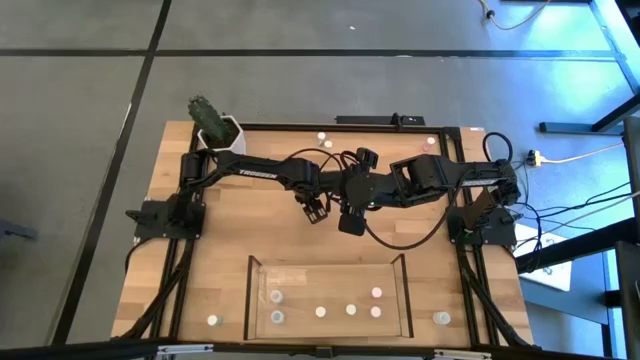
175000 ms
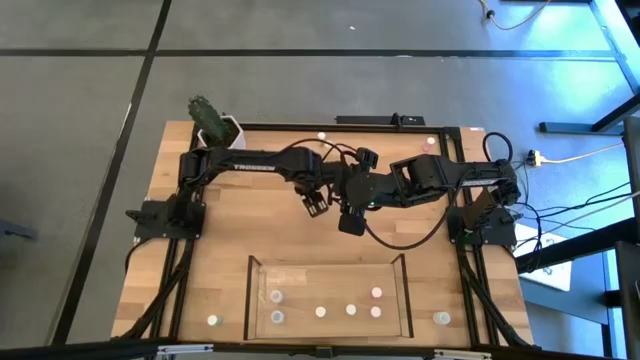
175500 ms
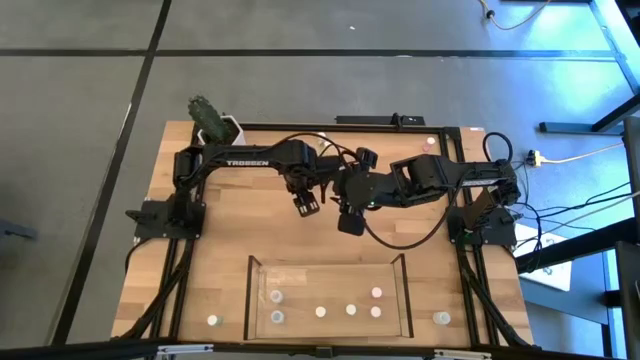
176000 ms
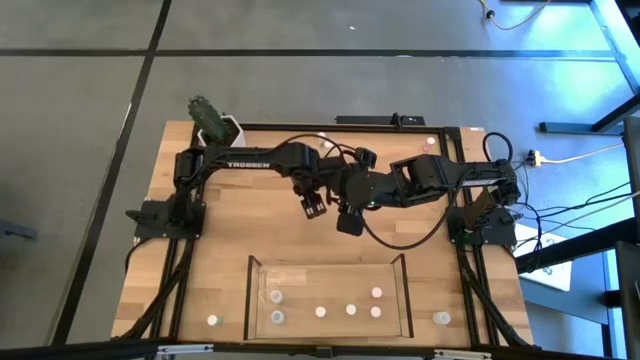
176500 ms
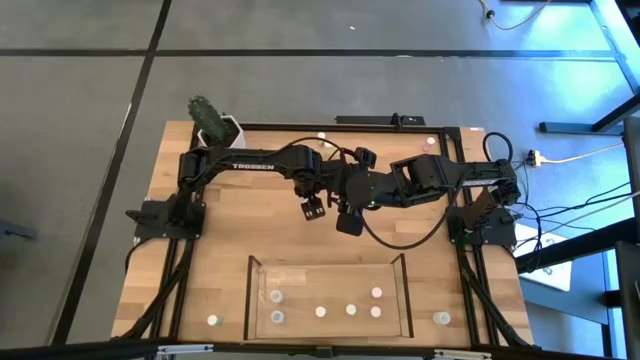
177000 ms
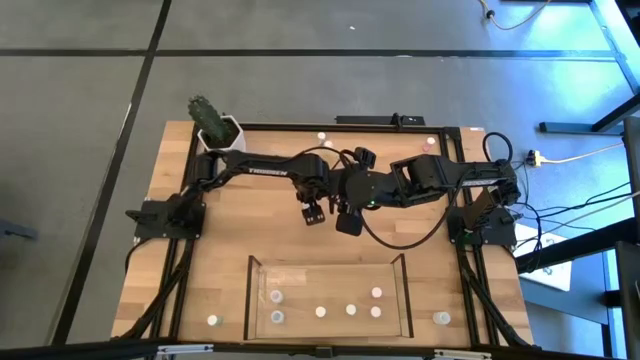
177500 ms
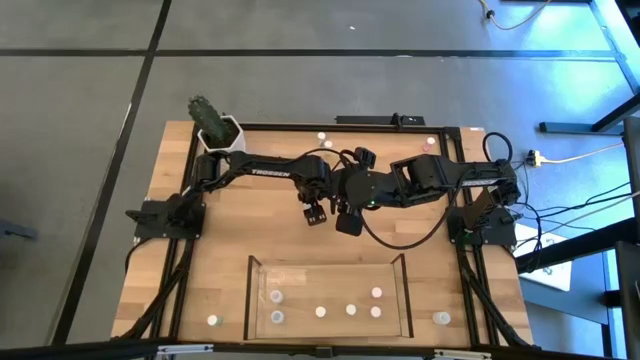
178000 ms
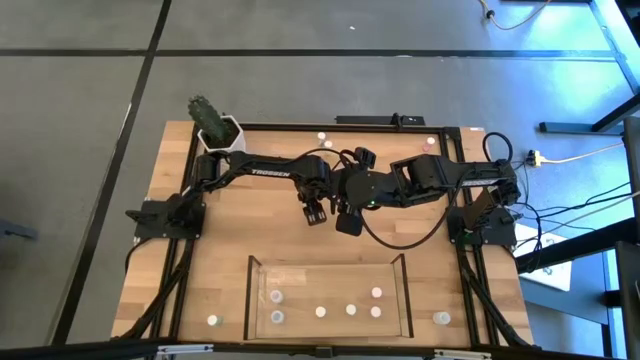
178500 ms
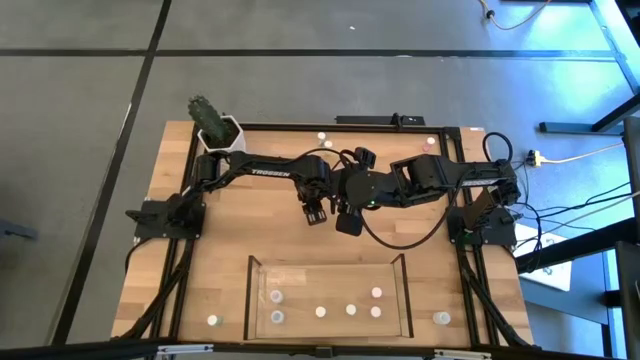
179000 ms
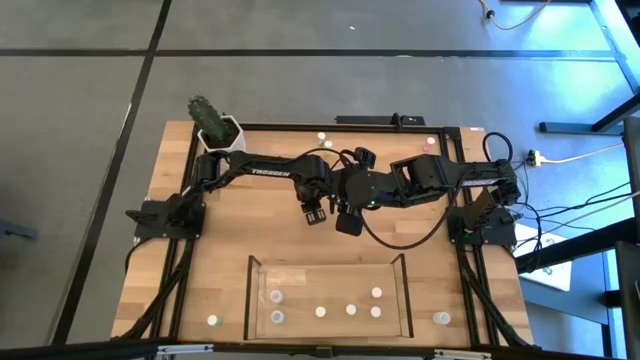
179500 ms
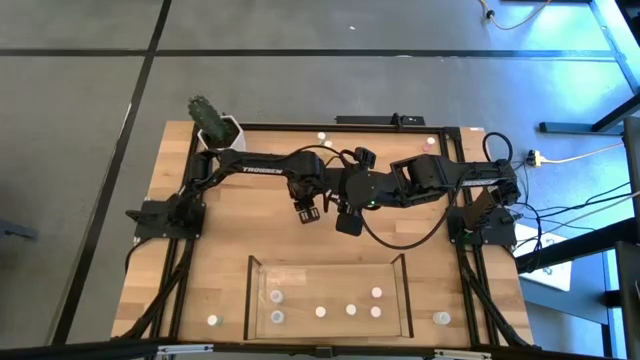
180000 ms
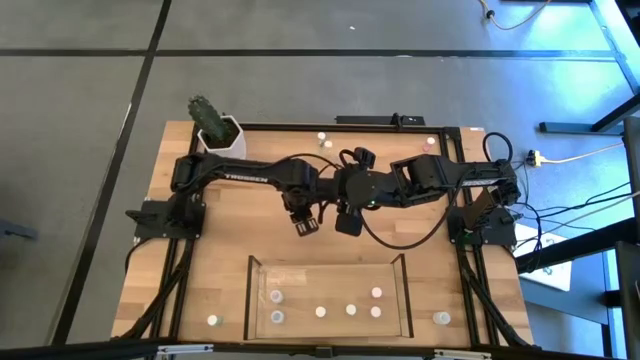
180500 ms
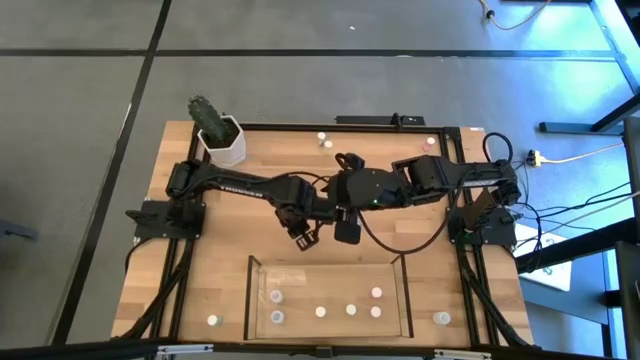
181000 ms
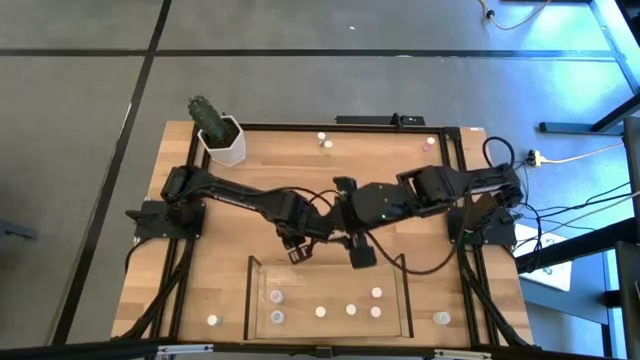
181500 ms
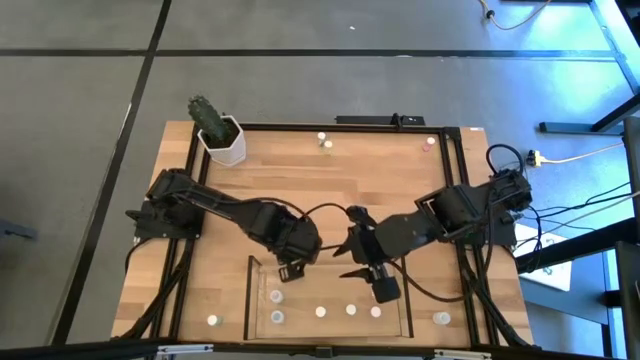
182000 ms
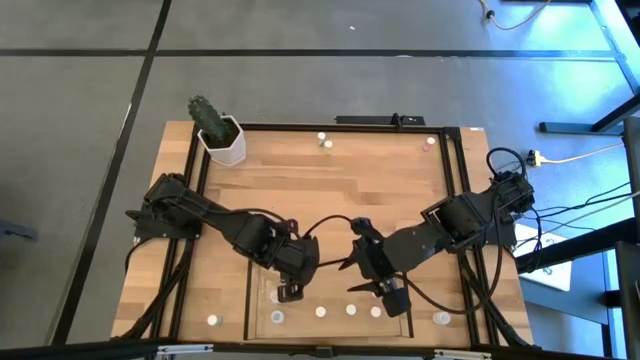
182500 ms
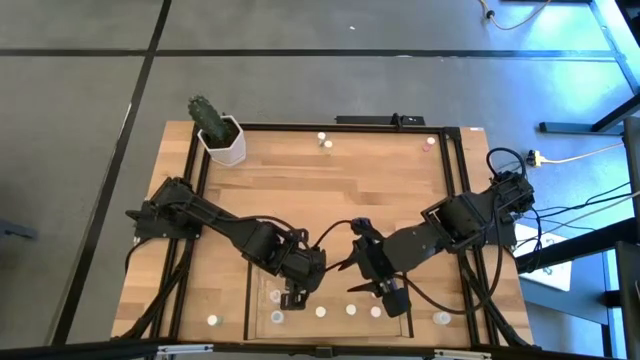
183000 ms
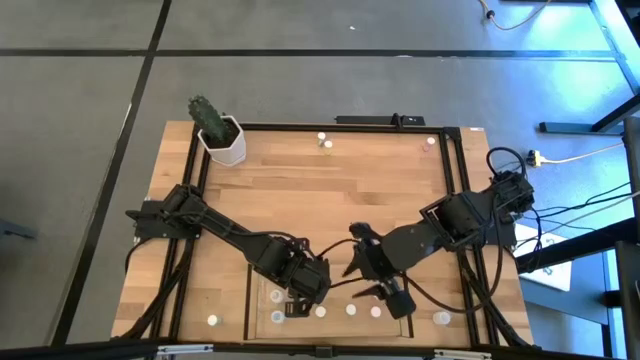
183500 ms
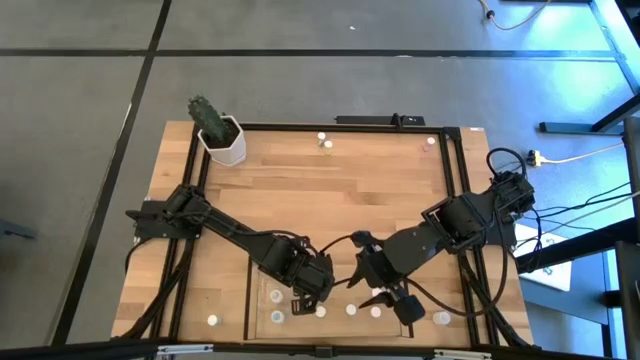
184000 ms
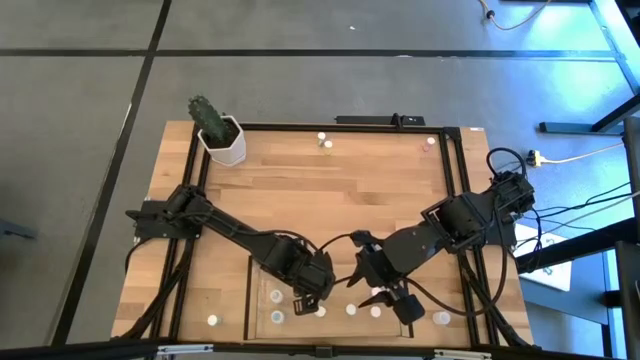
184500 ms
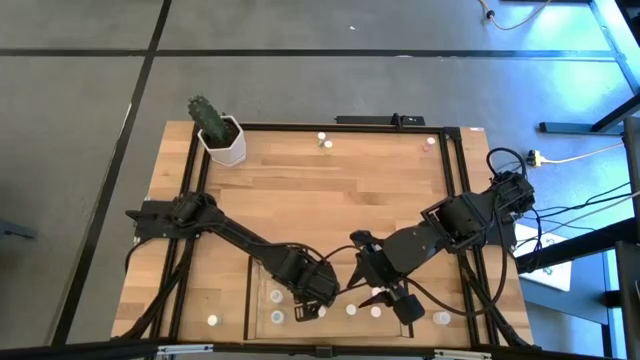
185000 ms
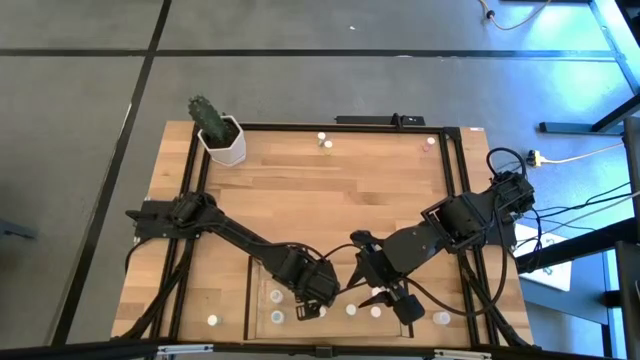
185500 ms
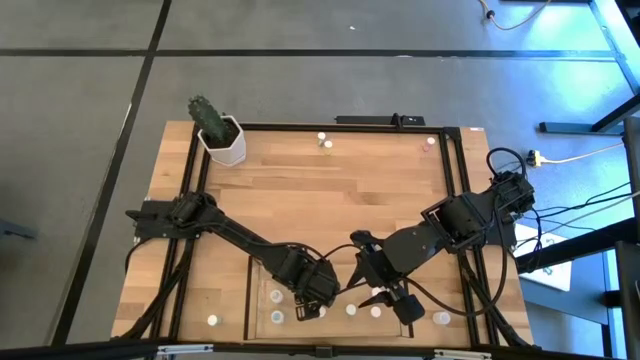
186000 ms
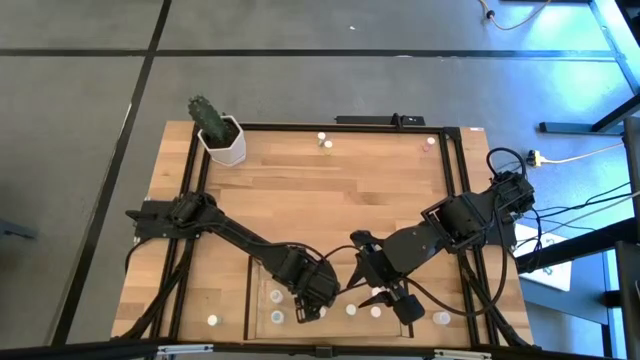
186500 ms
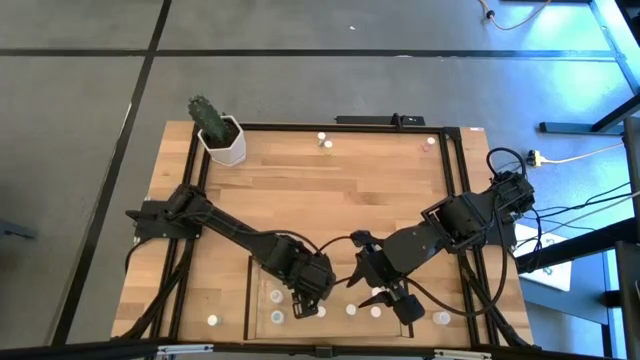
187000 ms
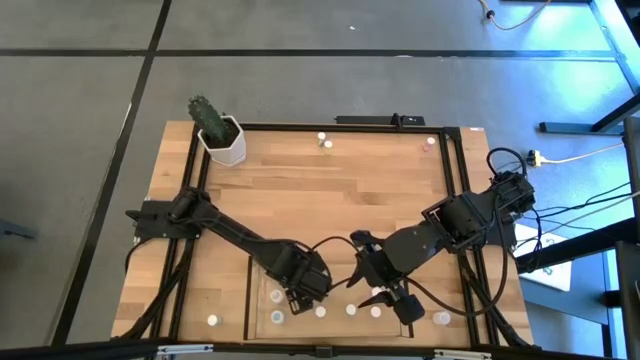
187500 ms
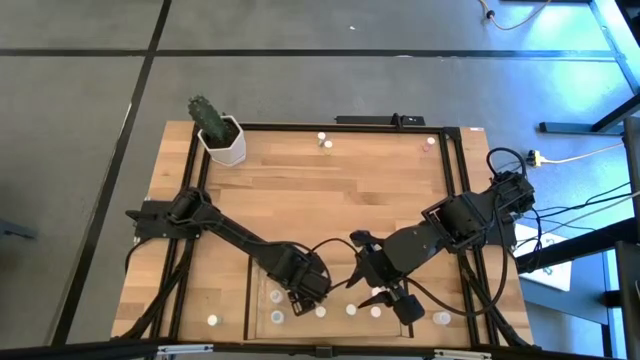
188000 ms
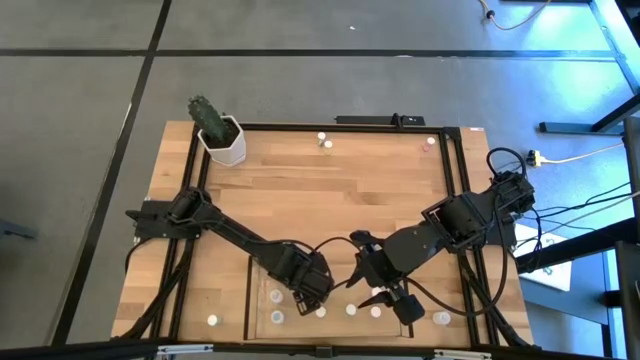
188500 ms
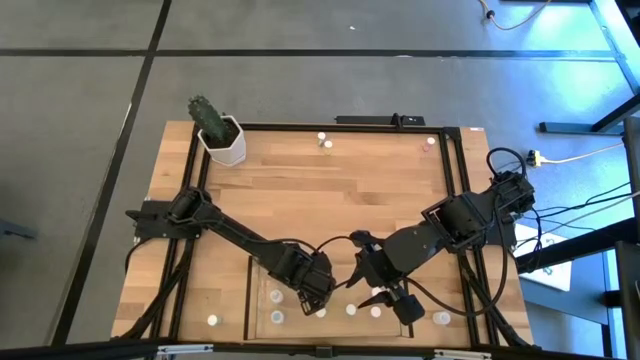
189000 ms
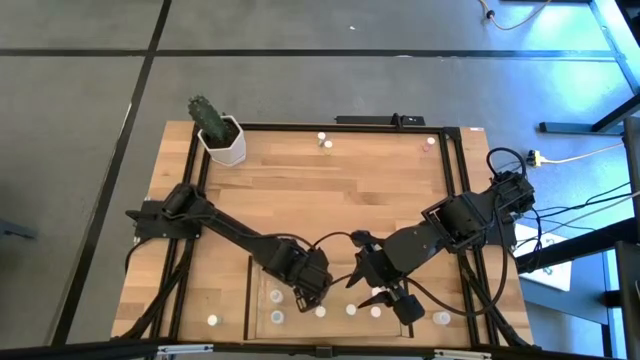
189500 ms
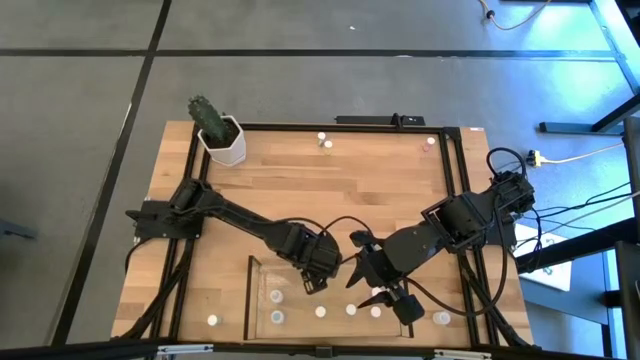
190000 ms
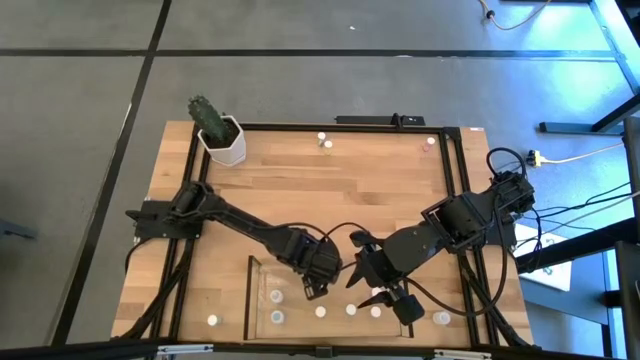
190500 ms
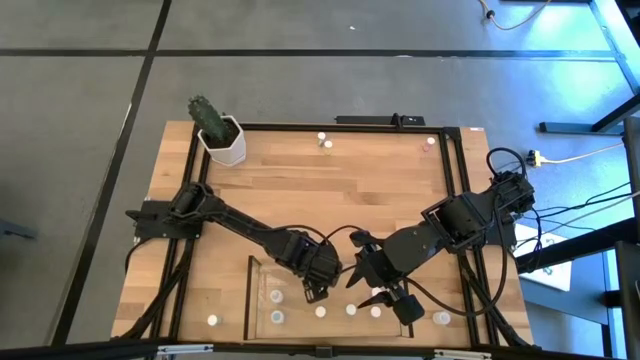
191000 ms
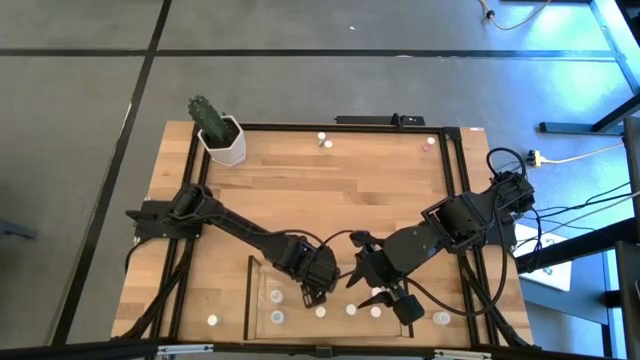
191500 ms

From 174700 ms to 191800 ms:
Task: Pick and place medicine bottles onto shelf by color
Put the bottom yellow pill bottle on the shelf aligned with the other yellow pill bottle

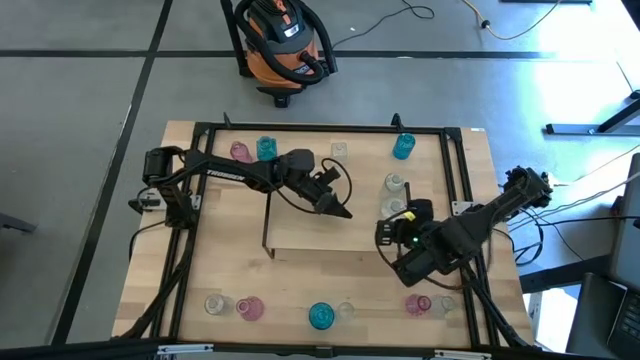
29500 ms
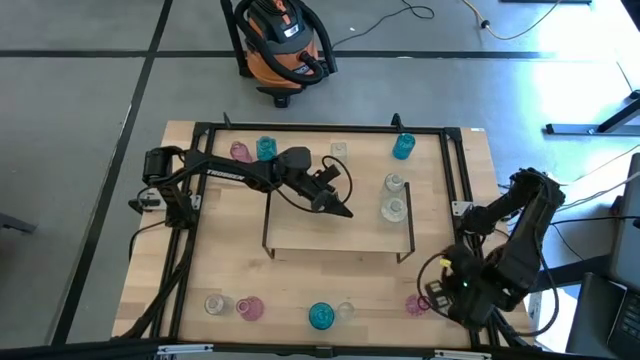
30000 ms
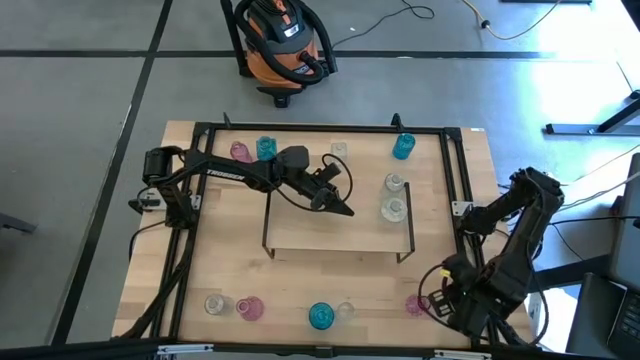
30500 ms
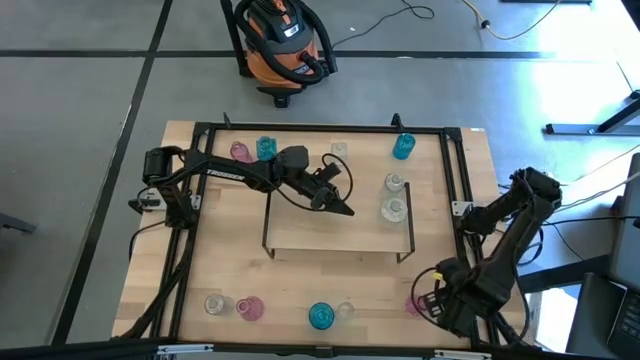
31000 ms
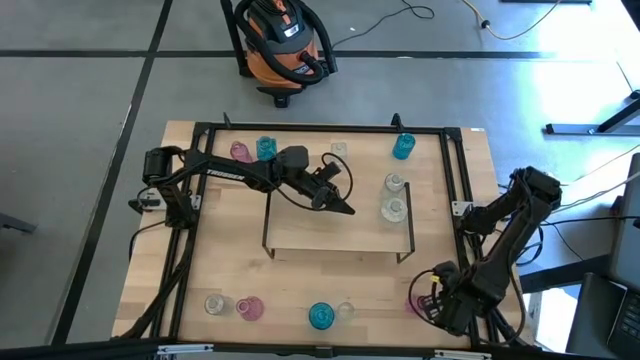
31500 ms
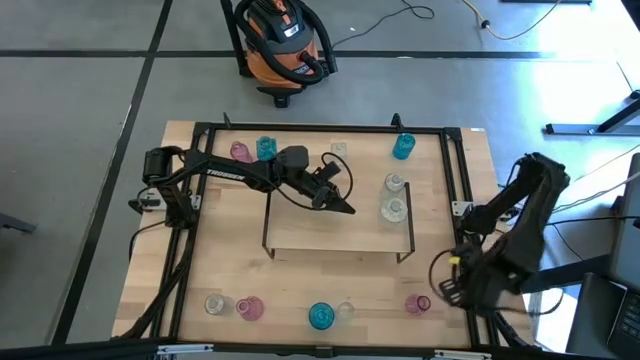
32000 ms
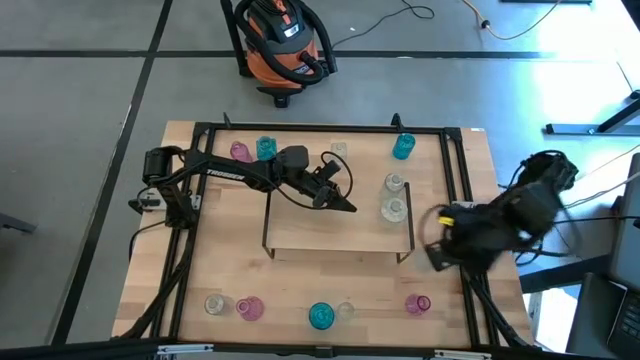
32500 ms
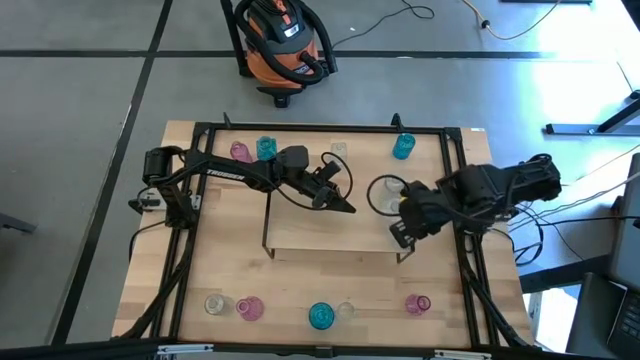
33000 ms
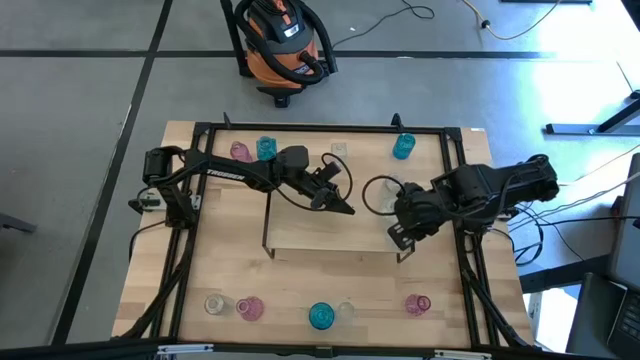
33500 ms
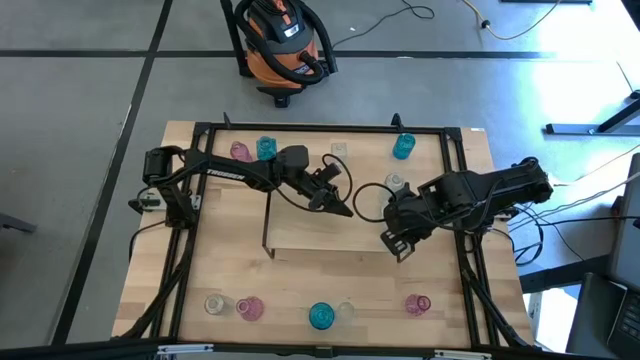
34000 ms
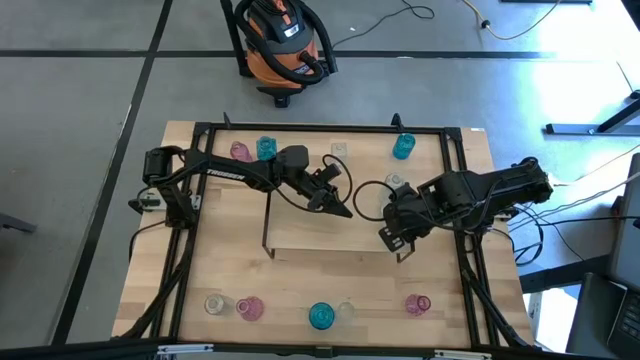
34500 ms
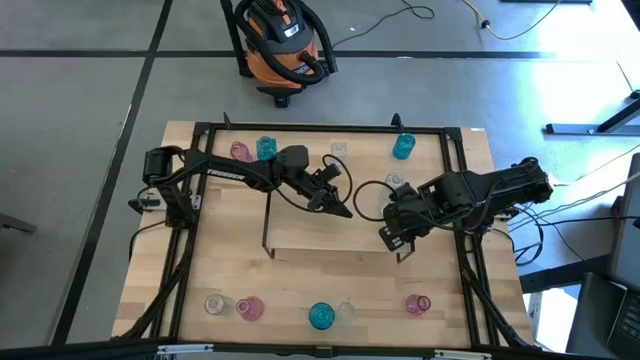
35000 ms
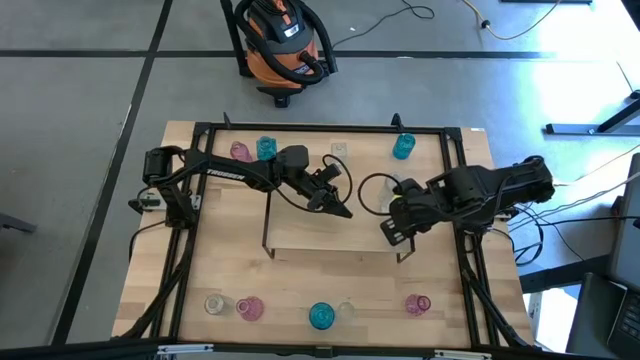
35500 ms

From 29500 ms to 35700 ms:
Task: sort vases onto shelf
Put the transparent vase on the shelf aligned with the other transparent vase
